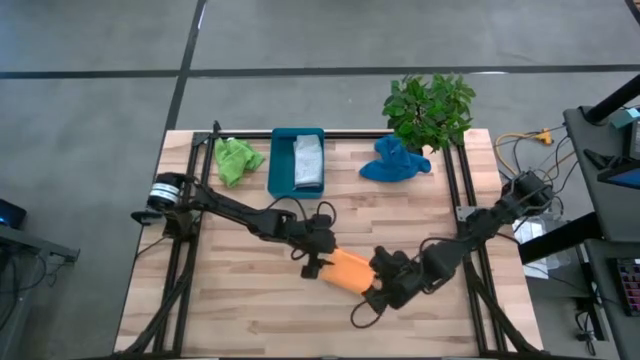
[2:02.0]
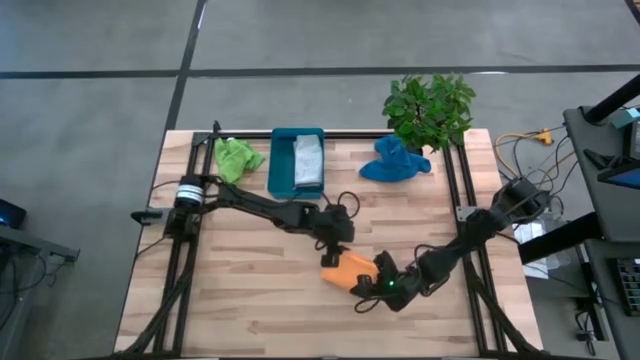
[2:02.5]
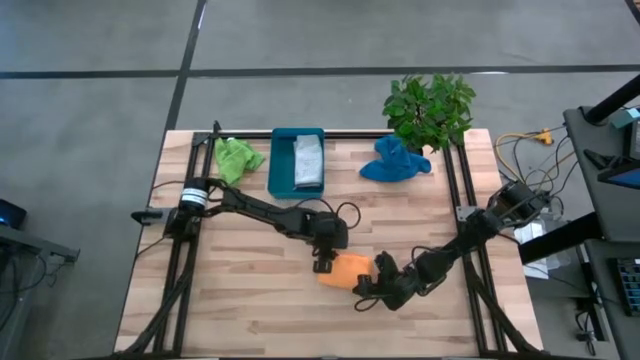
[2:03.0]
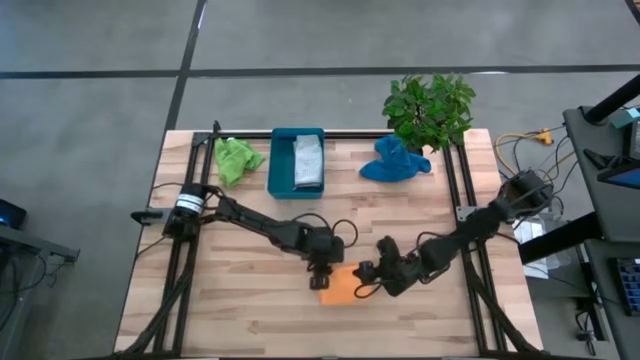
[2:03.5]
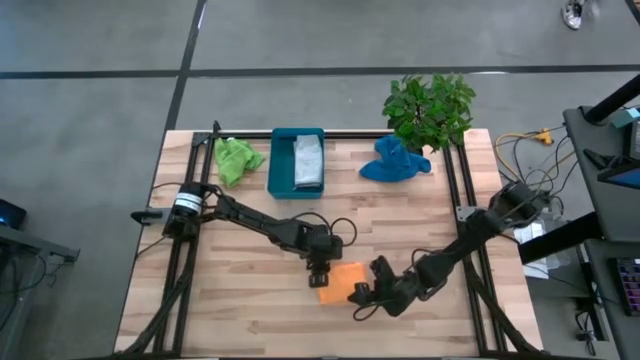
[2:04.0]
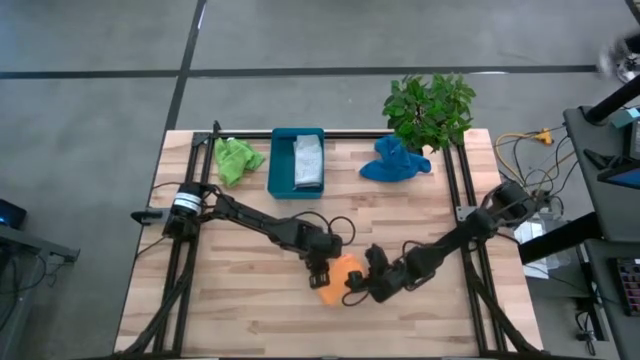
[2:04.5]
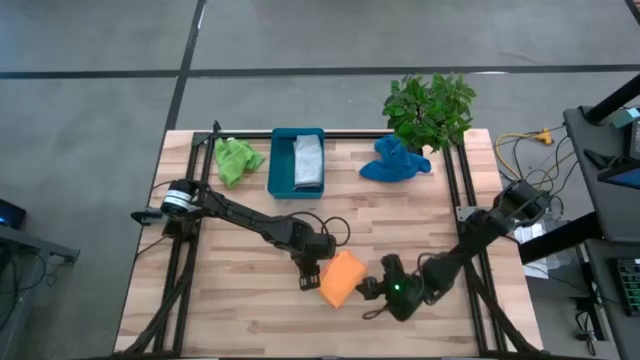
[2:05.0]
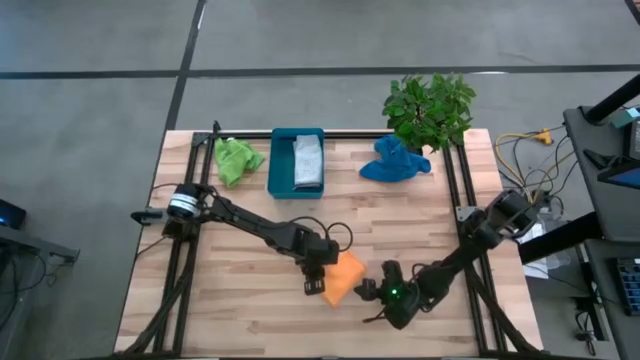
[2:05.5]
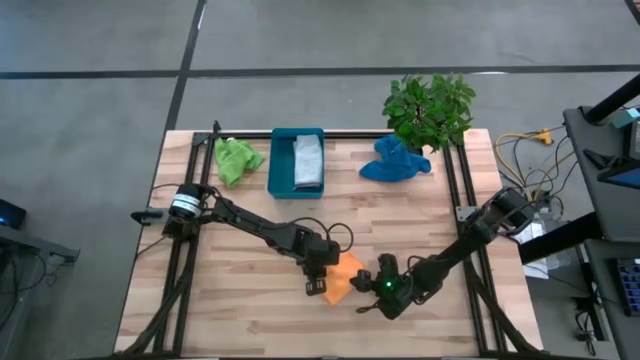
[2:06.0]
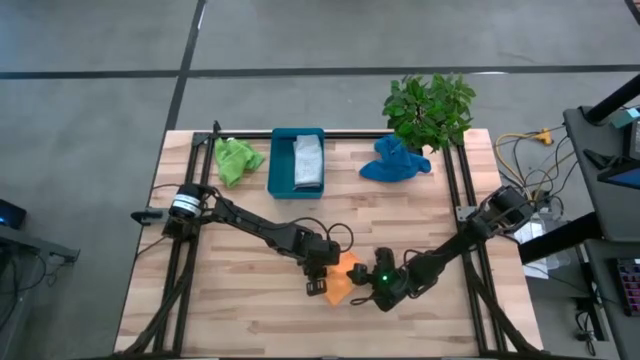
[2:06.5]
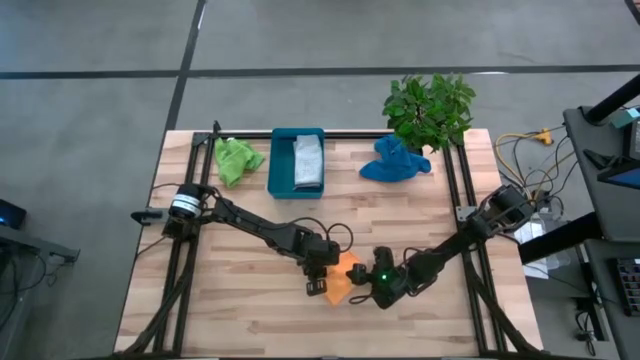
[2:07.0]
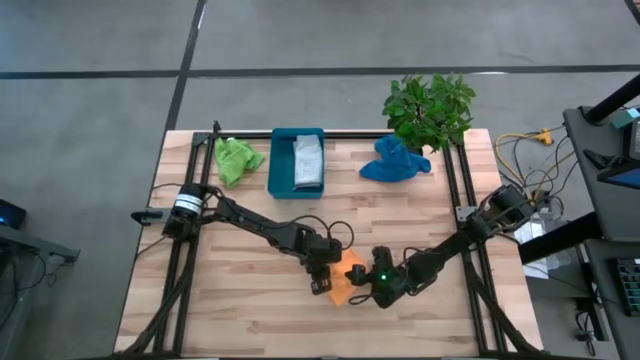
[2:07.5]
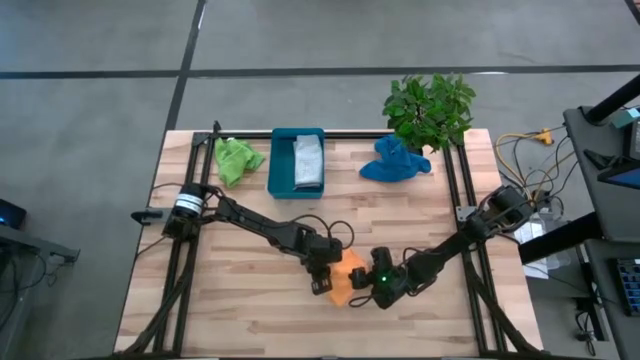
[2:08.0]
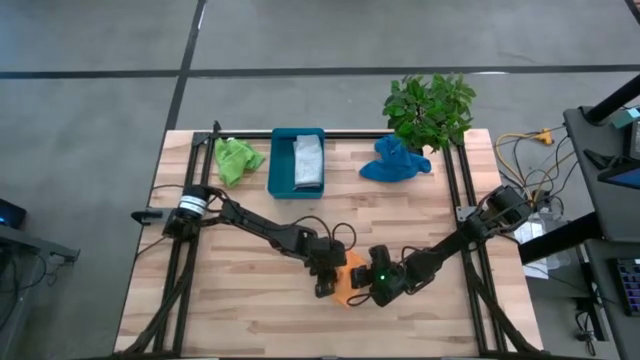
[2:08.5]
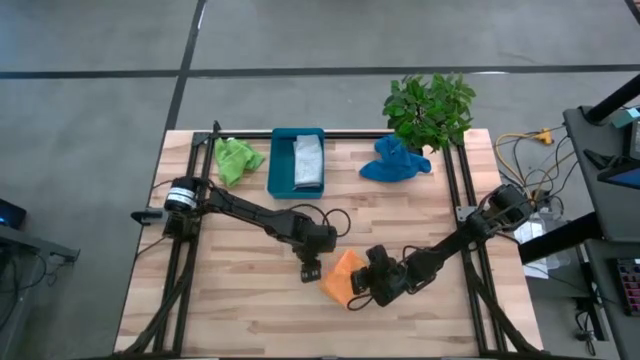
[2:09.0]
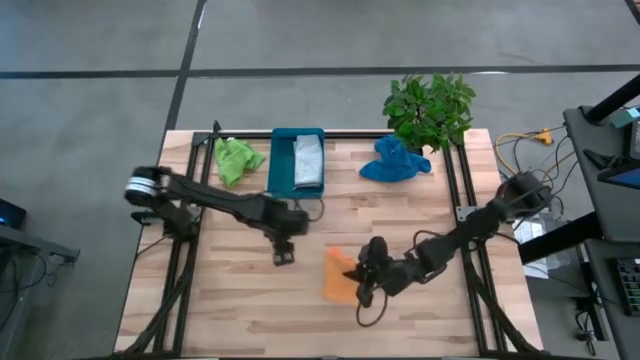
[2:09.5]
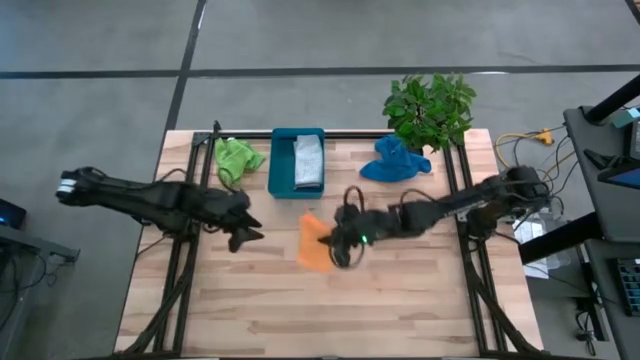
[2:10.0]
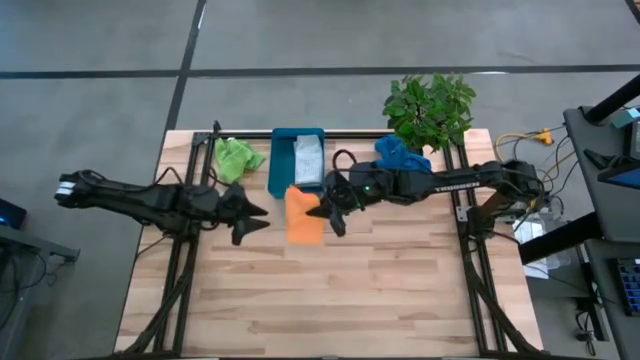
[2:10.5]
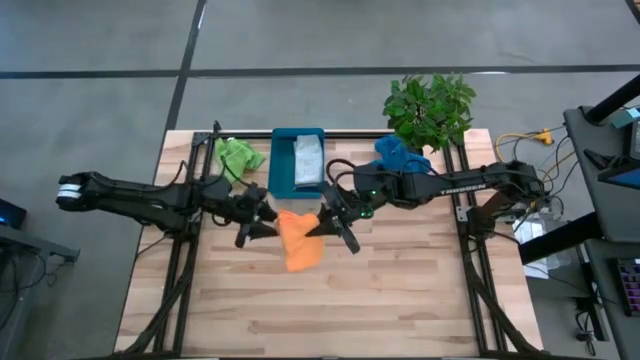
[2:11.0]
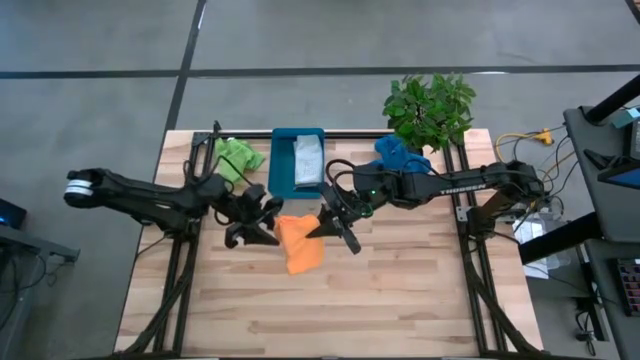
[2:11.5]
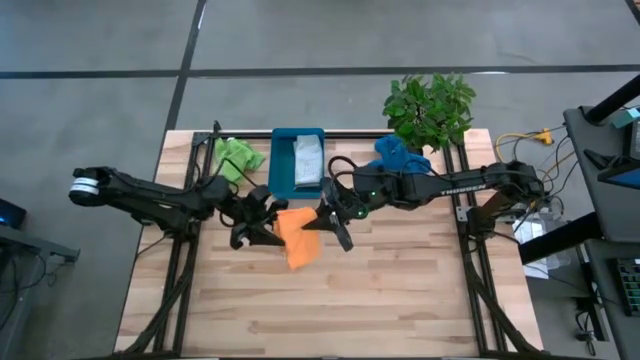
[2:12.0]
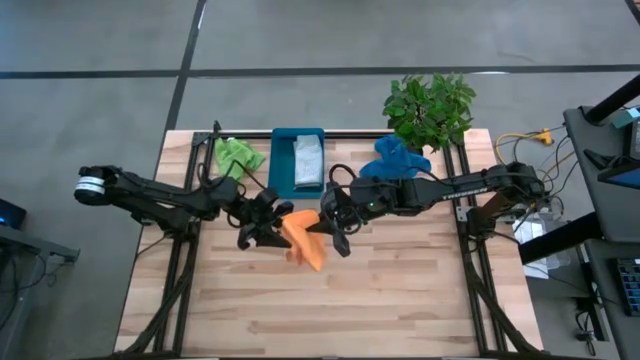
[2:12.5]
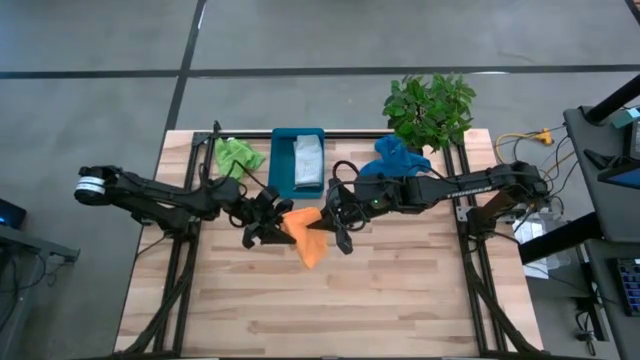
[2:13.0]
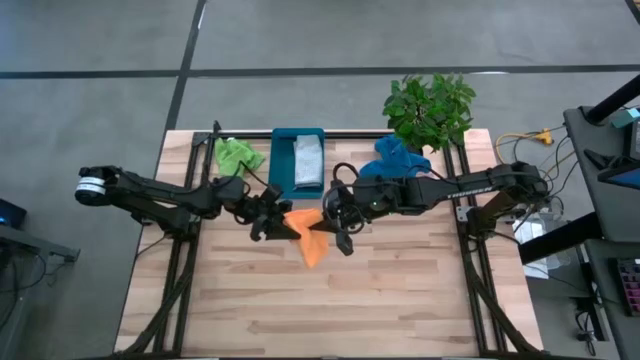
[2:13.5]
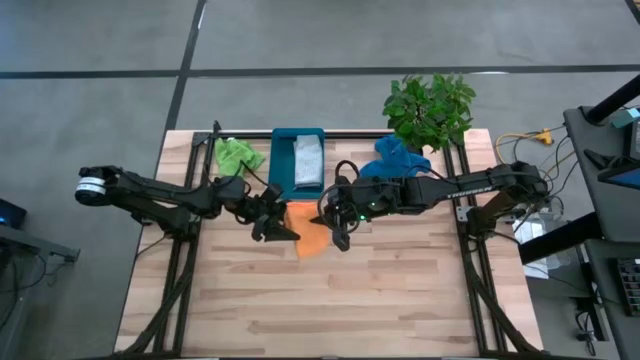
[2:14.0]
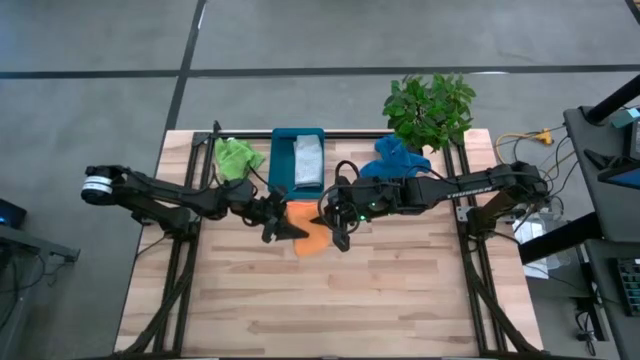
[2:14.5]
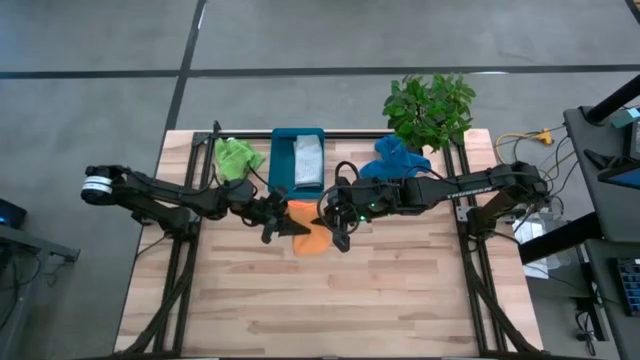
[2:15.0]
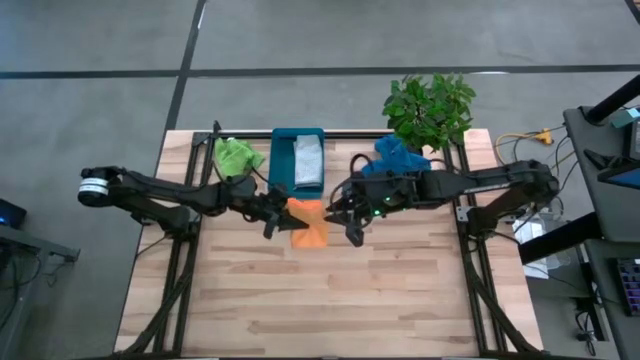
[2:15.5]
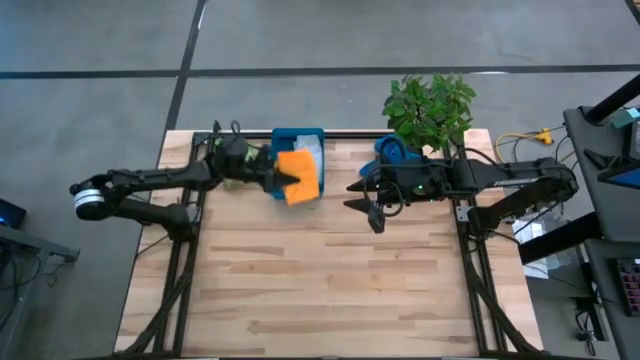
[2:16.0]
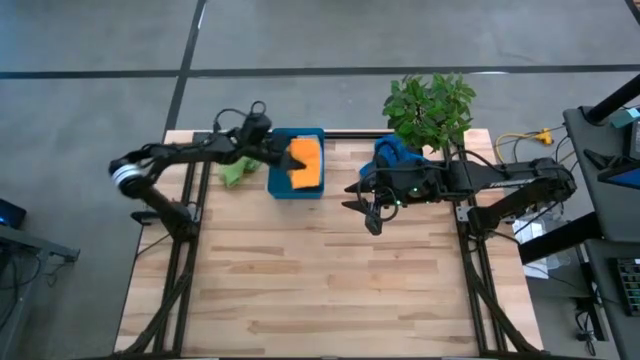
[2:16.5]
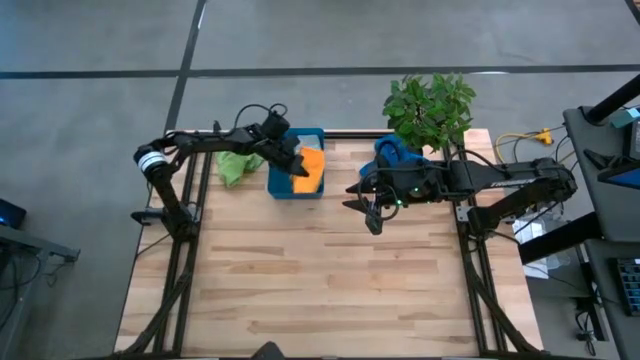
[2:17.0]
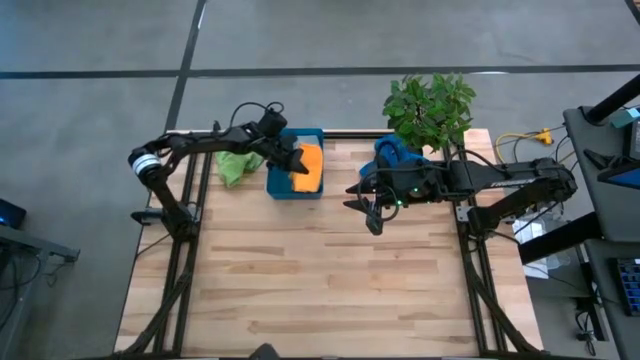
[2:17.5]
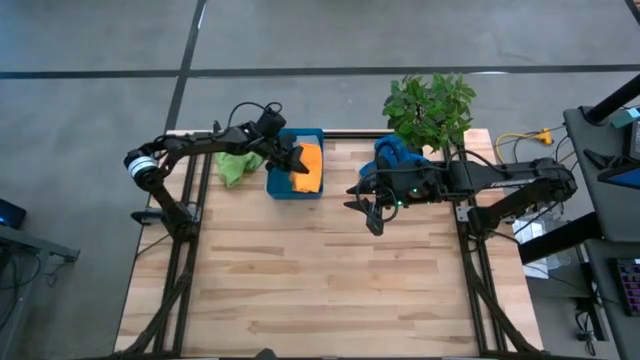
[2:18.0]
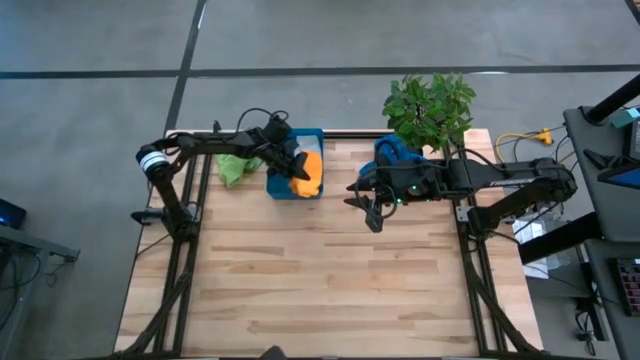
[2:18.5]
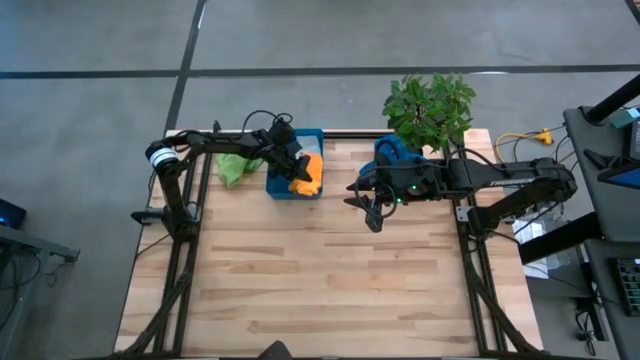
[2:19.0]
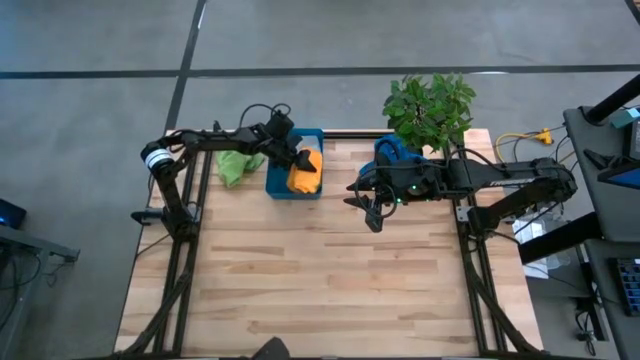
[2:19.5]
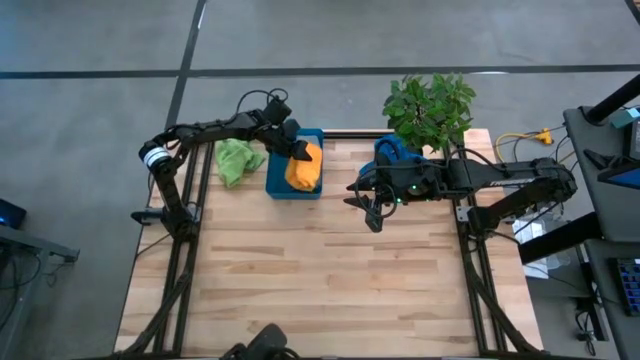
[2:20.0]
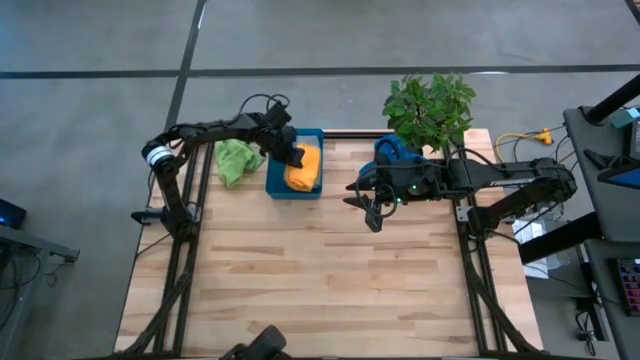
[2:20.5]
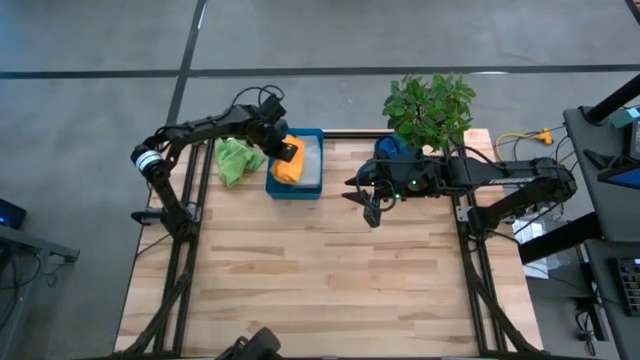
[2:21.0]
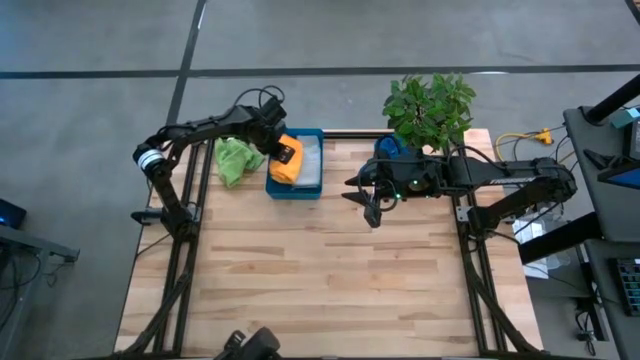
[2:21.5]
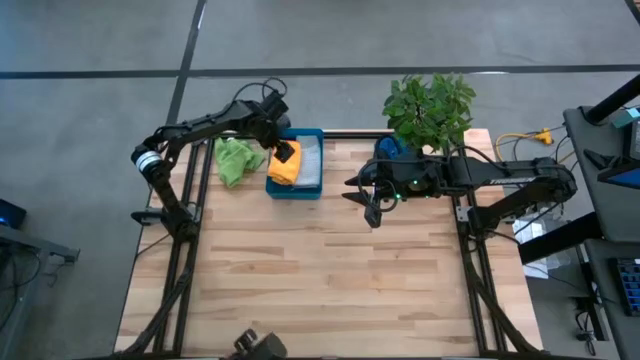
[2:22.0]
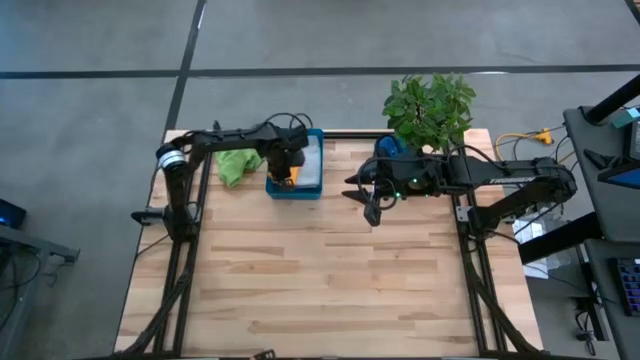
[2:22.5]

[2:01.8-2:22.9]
Task: Fold microfiber towels
Put the orange microfiber cloth into the blue bin
